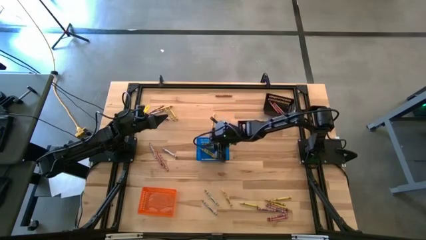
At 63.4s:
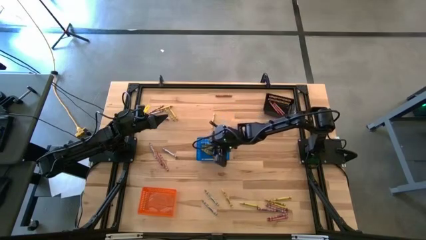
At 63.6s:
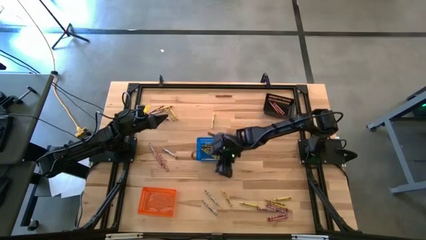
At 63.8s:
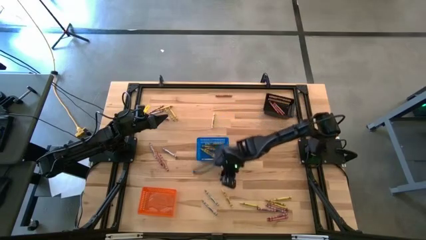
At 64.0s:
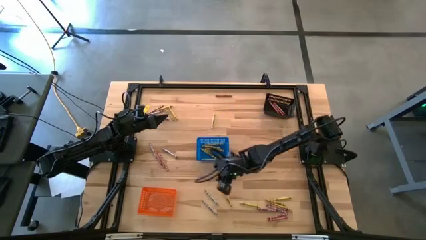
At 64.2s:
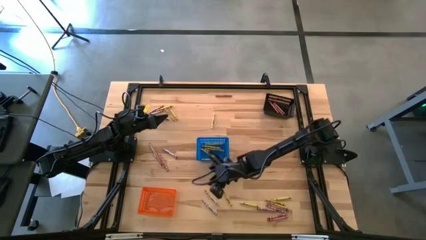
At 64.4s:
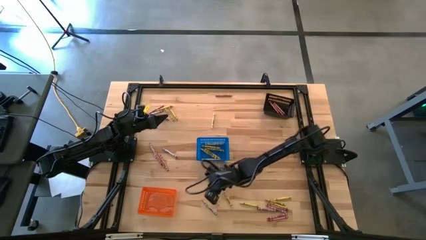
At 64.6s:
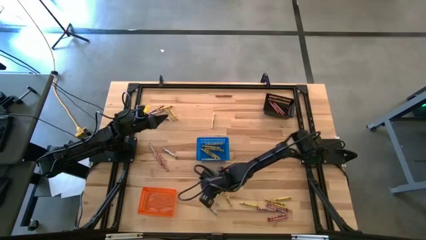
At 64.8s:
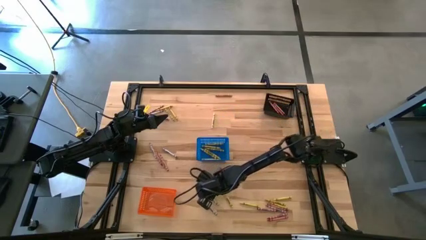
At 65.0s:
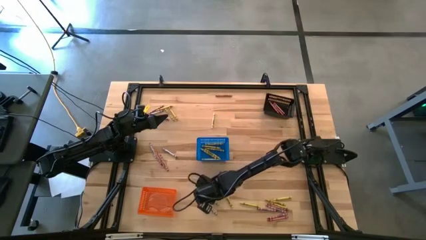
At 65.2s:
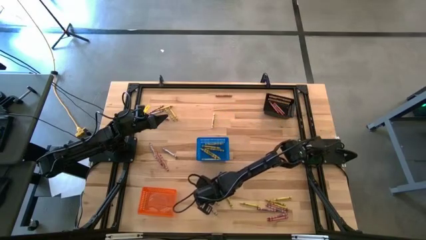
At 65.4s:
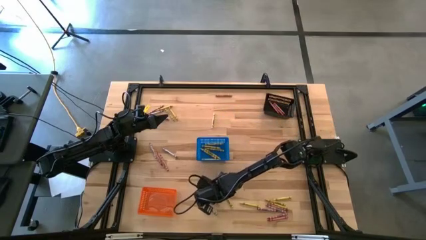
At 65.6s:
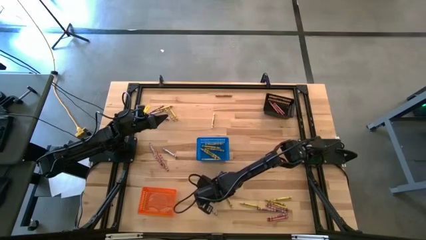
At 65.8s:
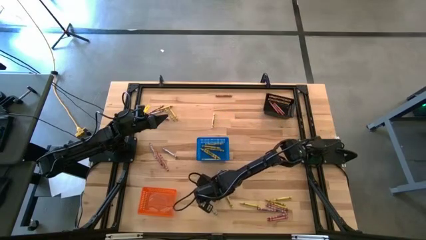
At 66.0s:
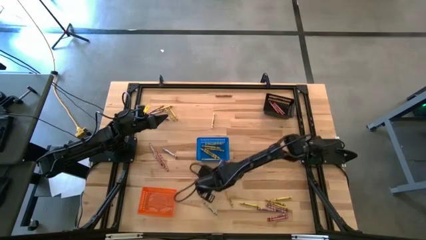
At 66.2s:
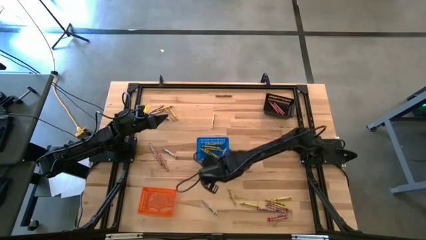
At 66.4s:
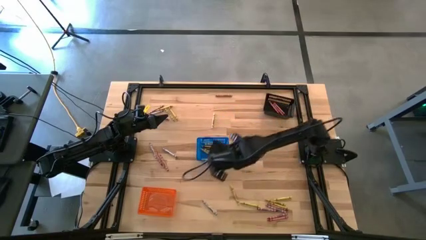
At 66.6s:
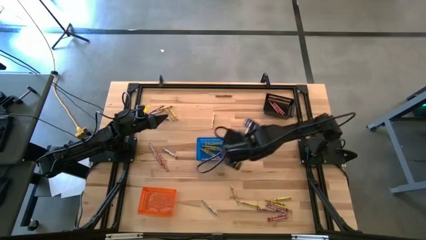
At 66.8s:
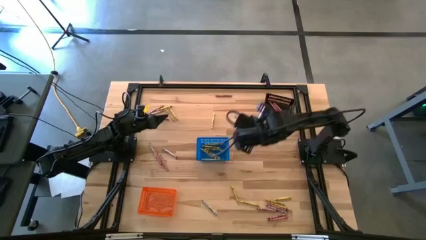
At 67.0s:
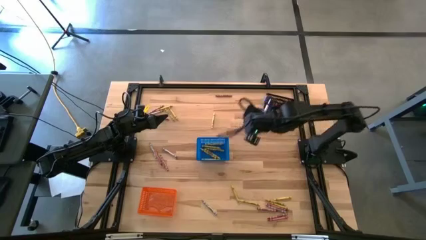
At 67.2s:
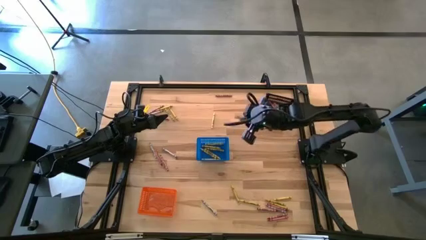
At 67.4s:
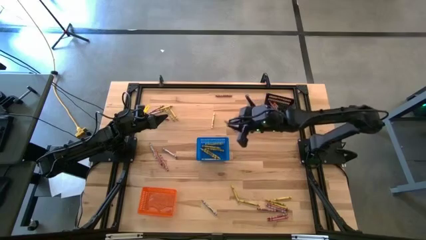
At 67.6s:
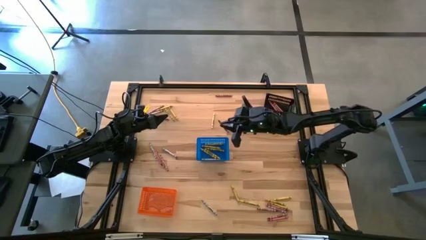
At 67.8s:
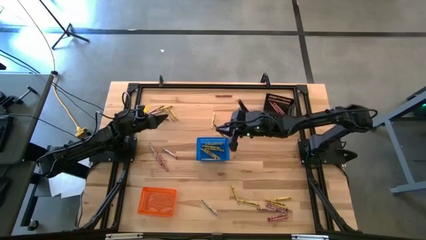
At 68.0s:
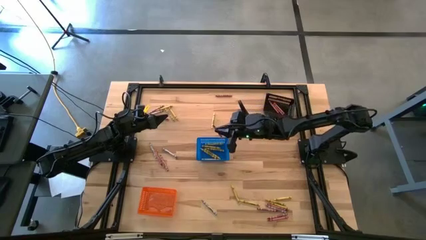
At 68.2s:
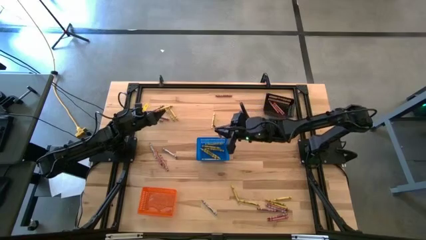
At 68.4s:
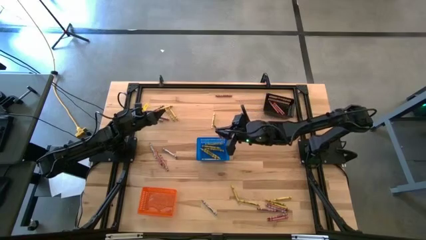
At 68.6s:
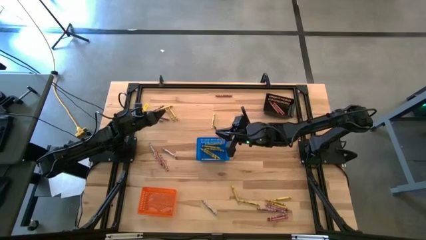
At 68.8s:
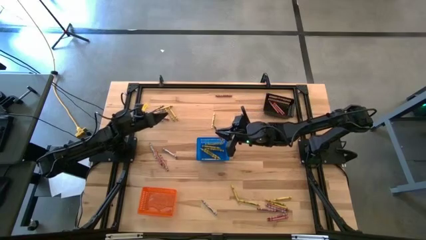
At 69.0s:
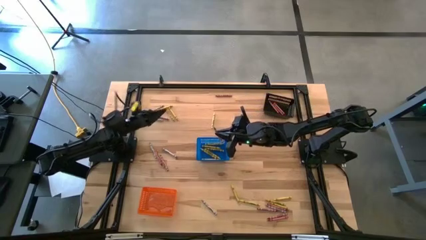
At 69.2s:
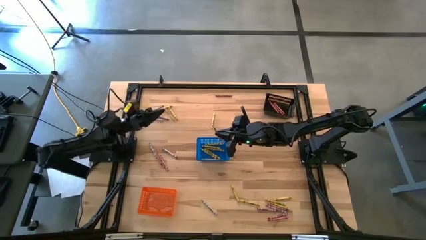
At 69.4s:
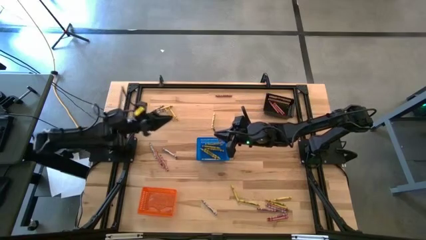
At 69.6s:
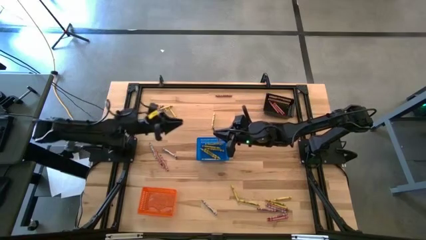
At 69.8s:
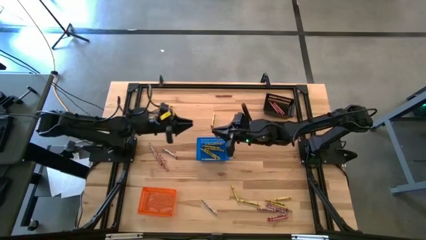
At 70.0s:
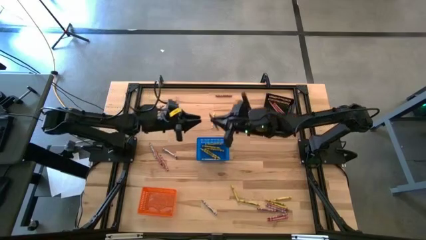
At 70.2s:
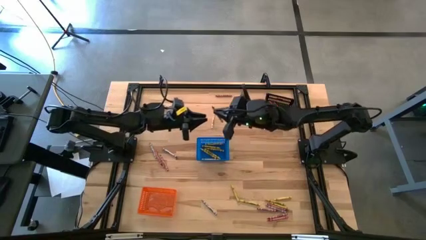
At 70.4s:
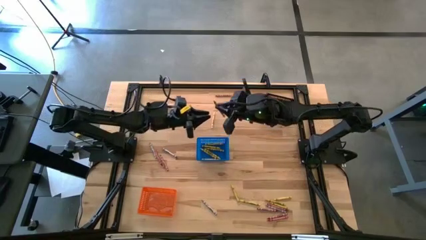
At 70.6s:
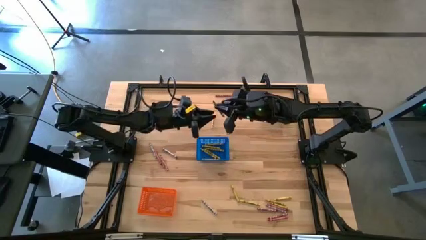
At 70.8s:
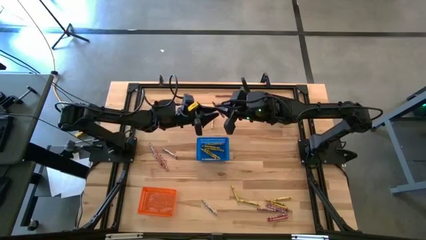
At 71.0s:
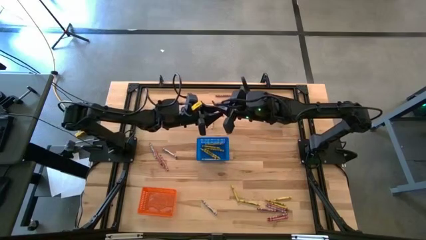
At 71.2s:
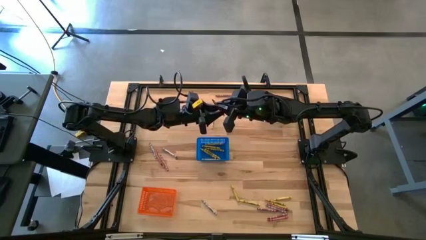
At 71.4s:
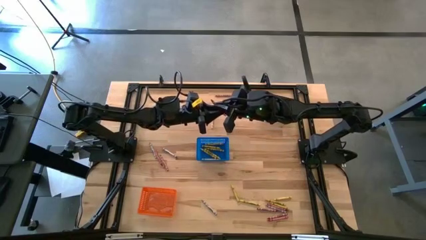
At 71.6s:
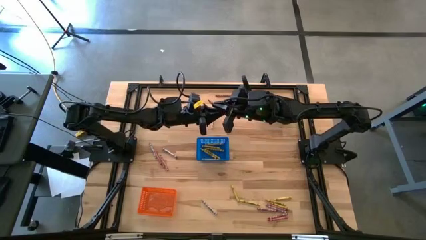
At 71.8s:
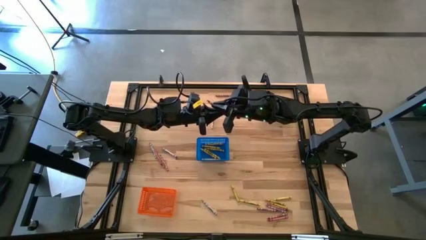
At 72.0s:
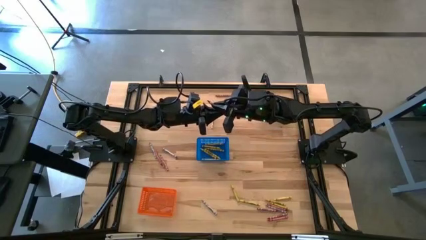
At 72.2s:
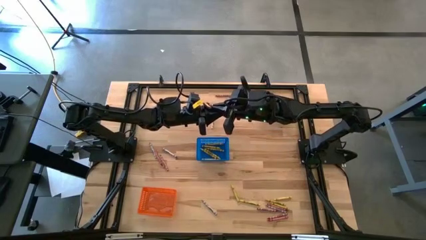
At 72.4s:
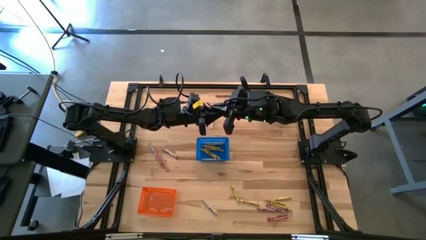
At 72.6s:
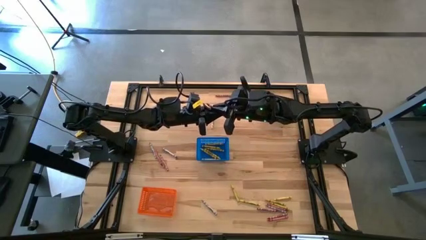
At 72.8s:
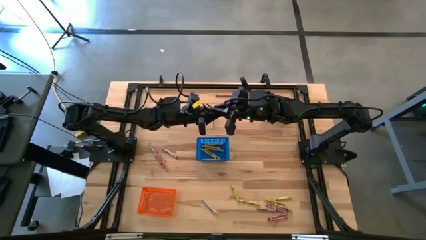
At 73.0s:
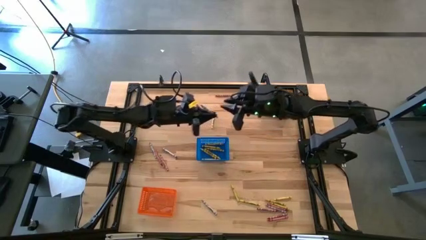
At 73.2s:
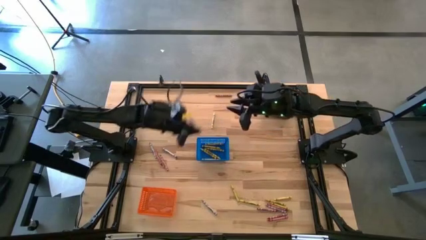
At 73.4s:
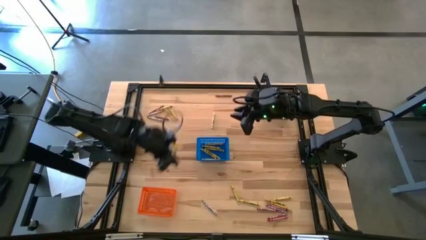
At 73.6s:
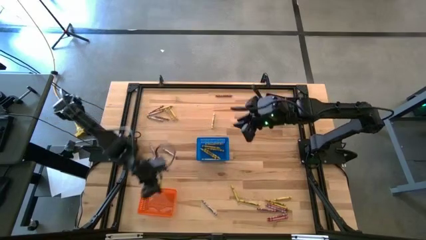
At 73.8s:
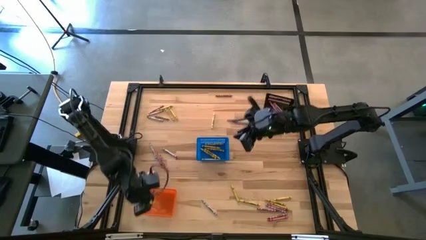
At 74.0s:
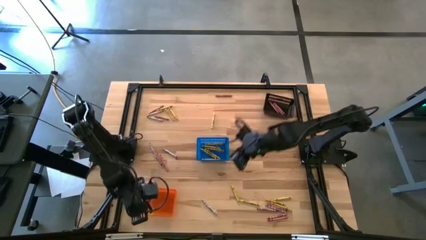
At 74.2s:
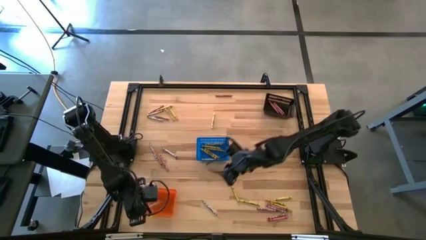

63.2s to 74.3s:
Task: Sort crayons
Put the gray crayon into the orange basket

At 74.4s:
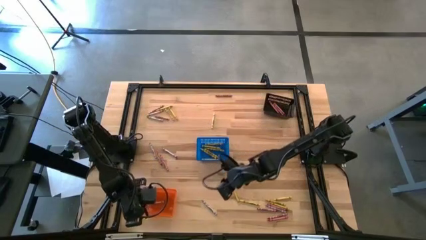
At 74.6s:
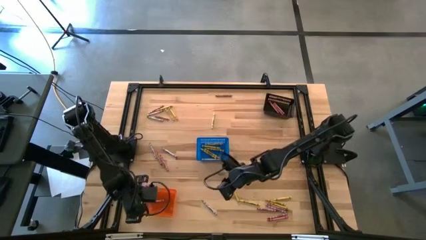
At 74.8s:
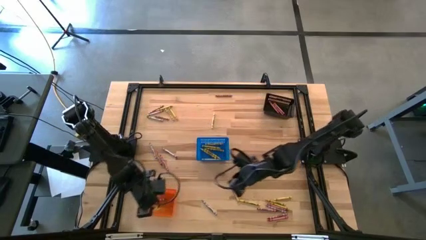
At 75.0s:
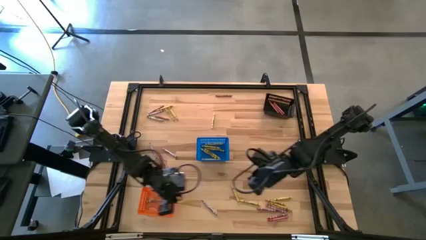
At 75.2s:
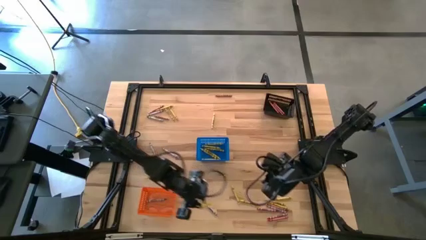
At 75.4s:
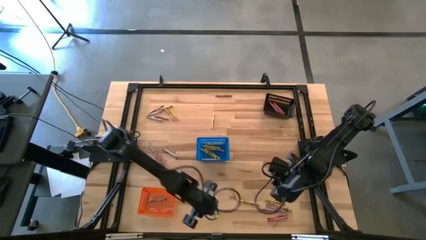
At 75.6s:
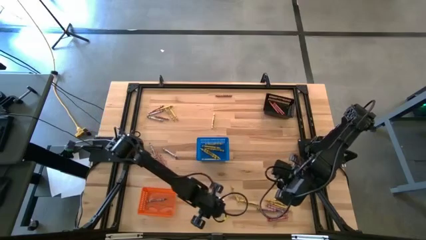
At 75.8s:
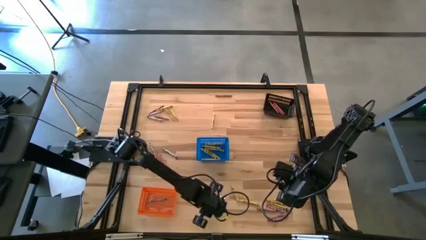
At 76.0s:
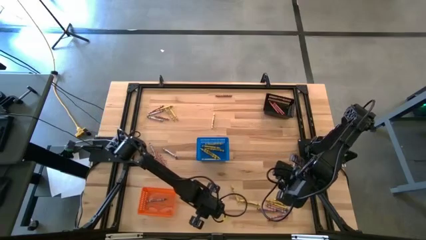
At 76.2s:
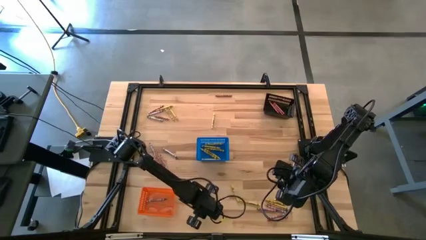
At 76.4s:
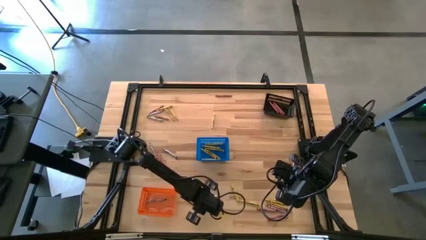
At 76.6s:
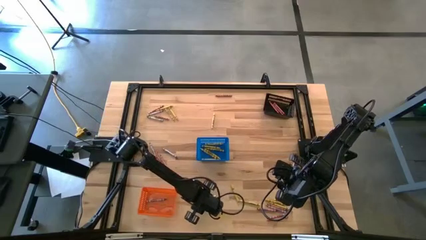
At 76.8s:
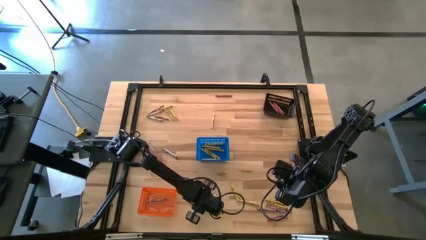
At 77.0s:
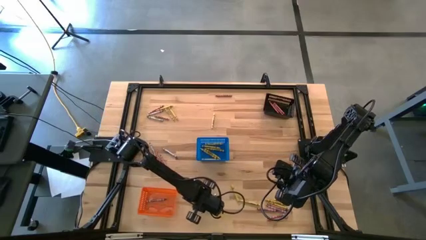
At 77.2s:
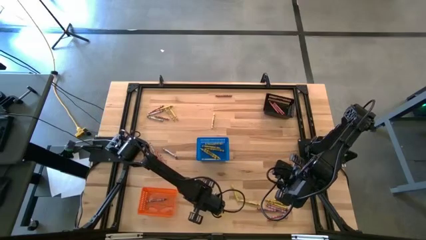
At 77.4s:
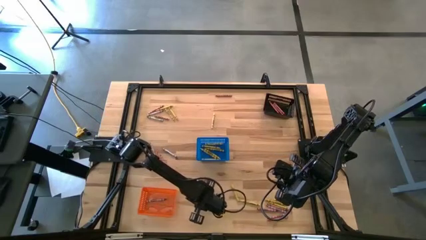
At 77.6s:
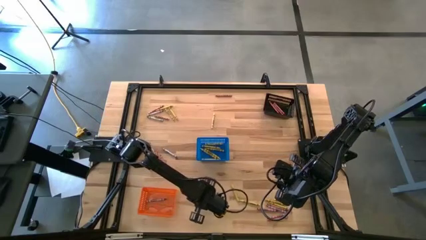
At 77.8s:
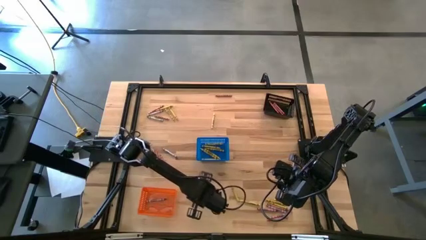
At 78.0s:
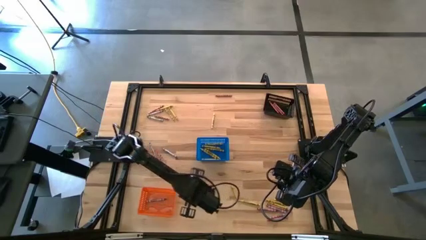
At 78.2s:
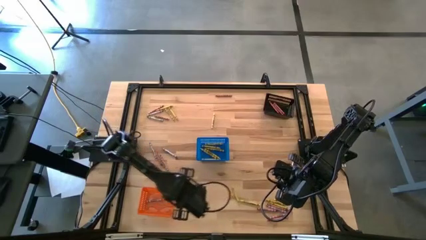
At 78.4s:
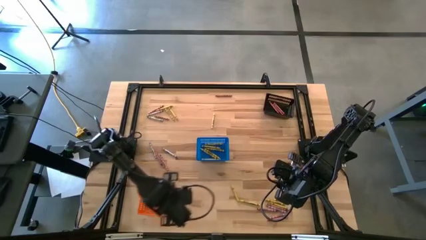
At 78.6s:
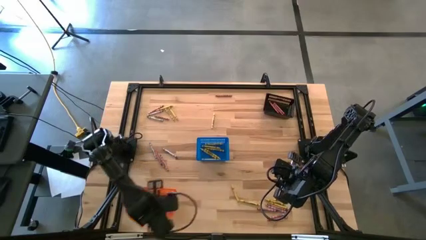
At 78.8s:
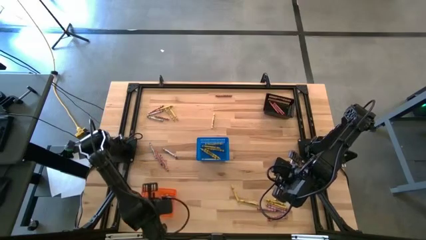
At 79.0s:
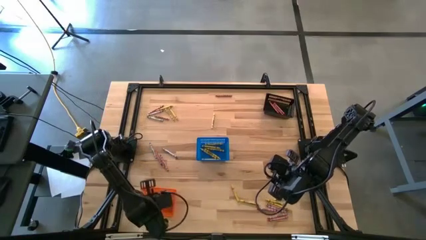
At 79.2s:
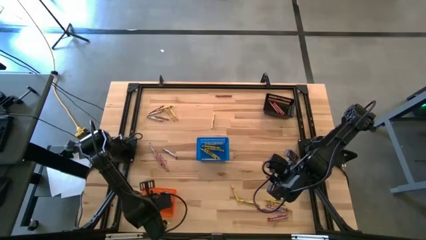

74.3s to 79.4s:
Put the gray crayon into the orange basket

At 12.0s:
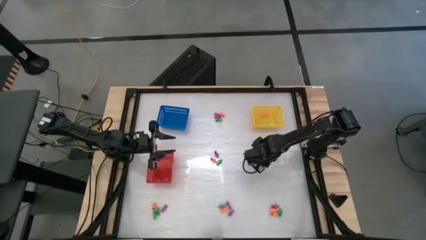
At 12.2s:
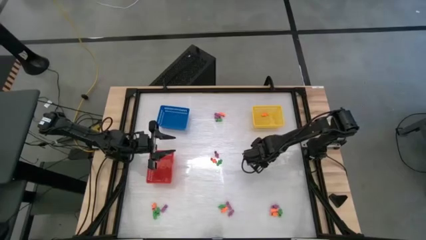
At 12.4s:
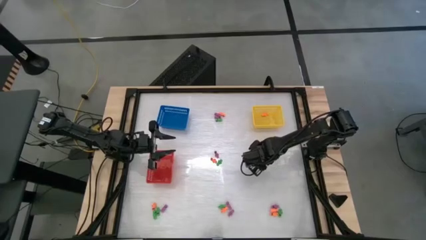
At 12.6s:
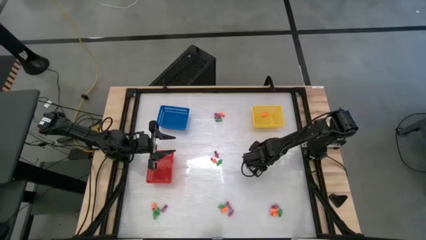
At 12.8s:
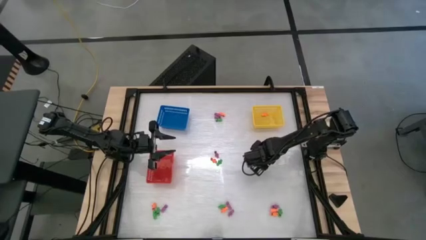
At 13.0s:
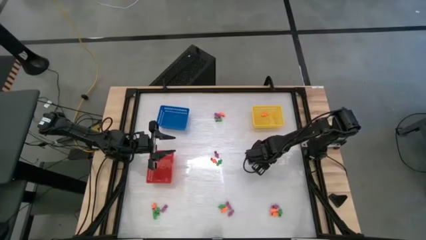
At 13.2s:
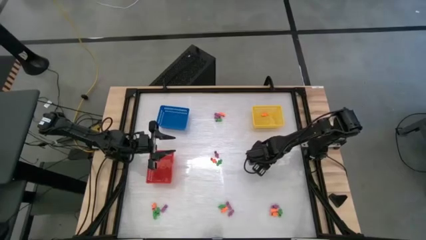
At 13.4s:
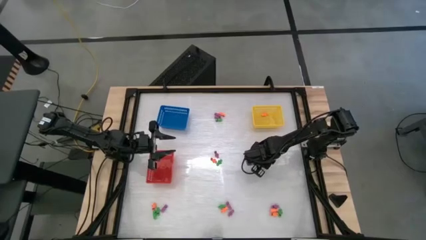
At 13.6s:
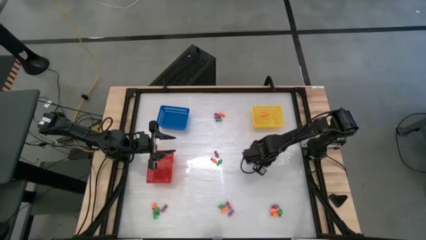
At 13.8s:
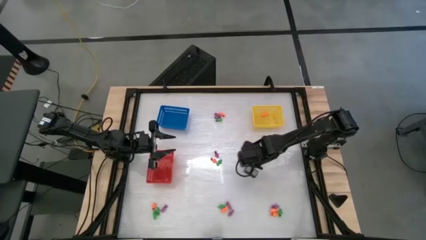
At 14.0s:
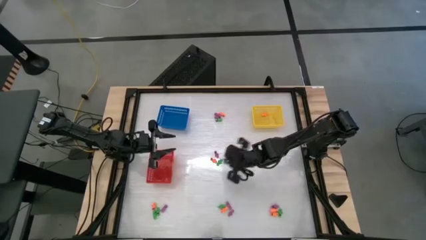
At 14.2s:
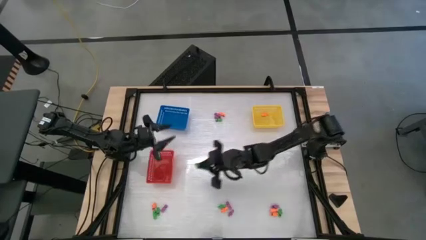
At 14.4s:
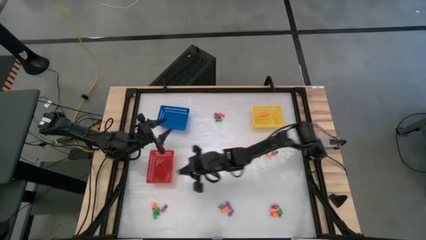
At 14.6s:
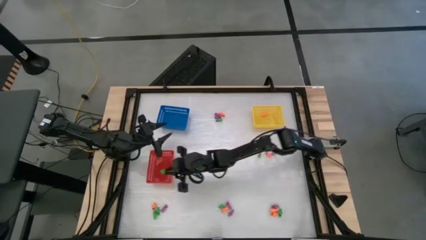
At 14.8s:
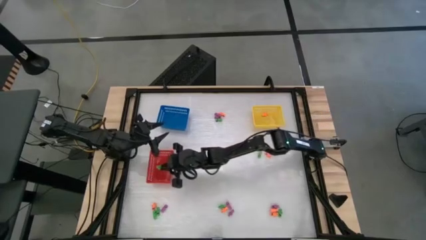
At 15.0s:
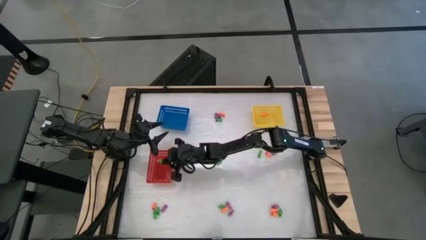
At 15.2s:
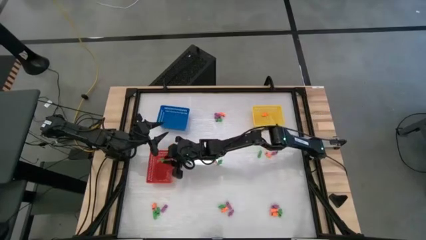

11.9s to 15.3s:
Task: Sort Halloween decoration
Put the green skeleton toy into the red bin
